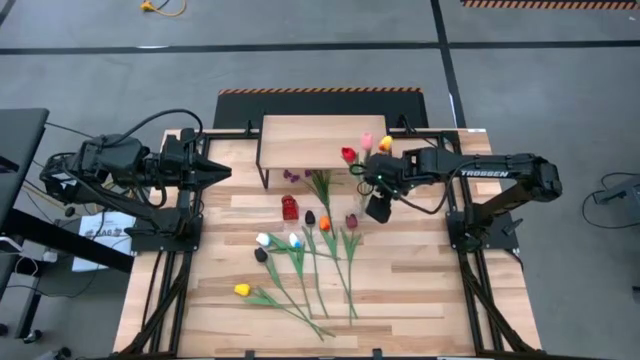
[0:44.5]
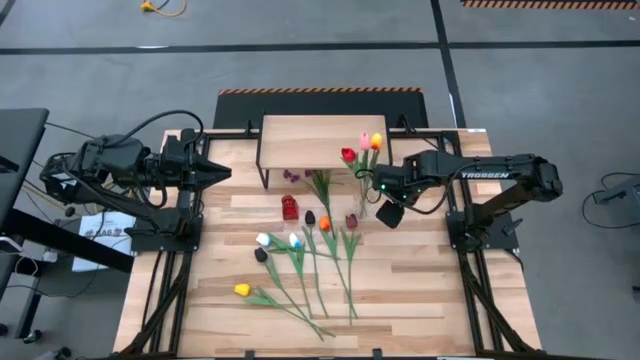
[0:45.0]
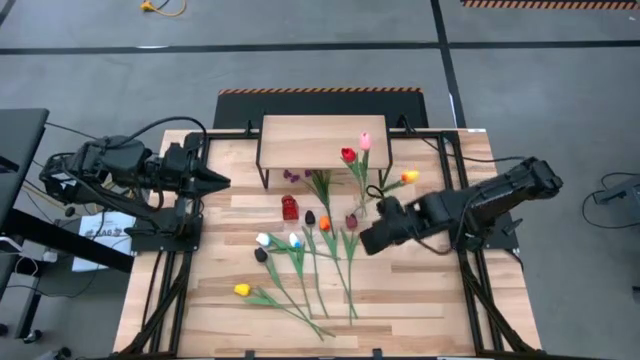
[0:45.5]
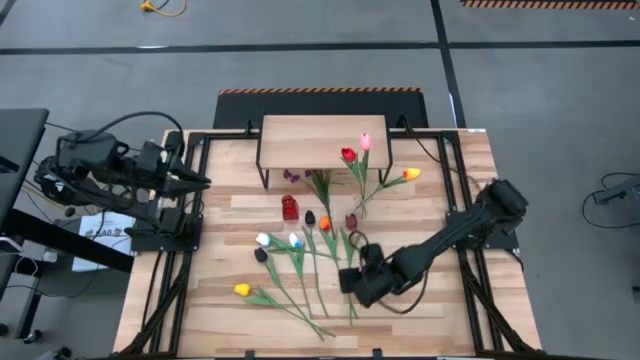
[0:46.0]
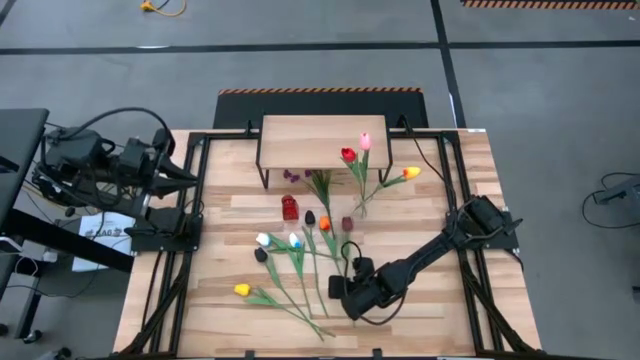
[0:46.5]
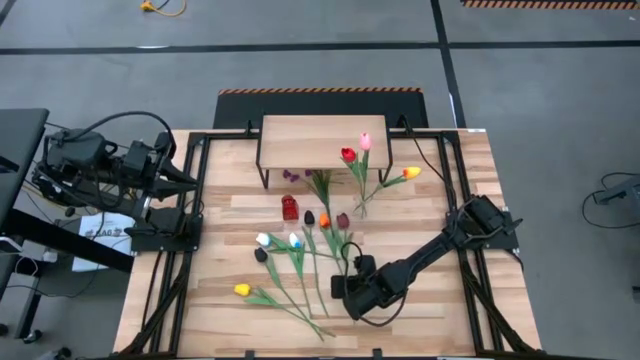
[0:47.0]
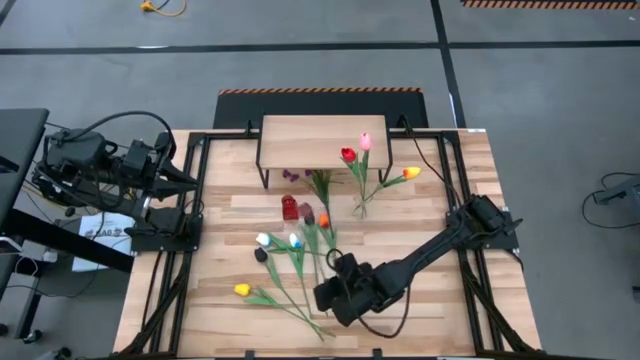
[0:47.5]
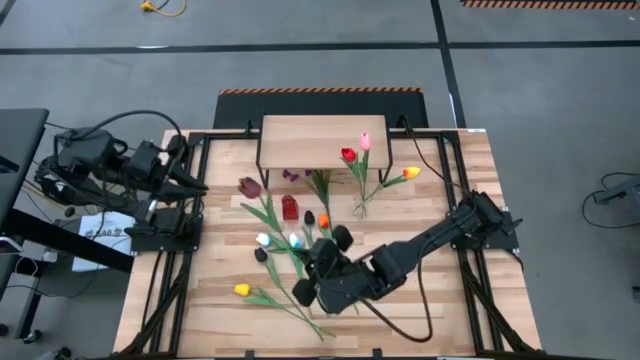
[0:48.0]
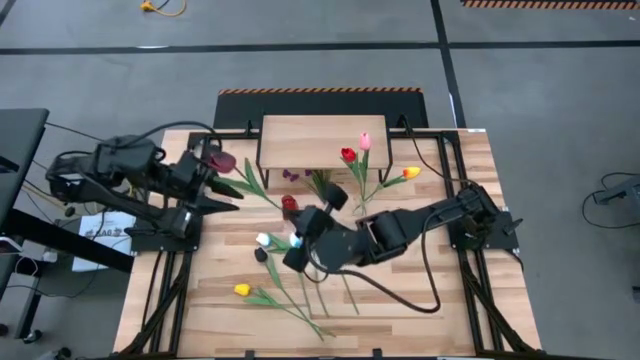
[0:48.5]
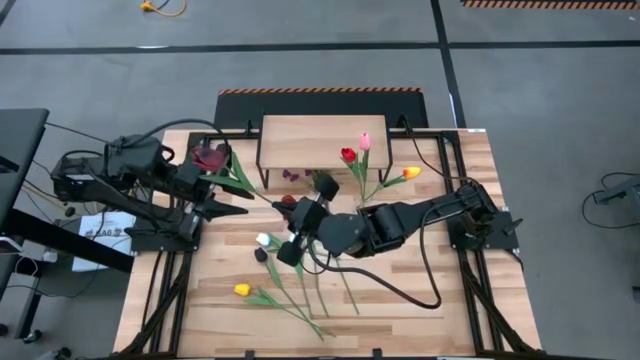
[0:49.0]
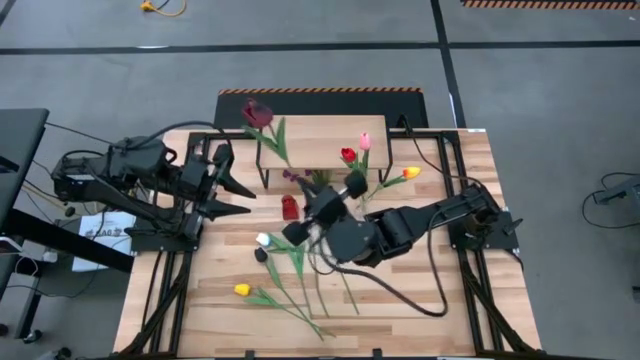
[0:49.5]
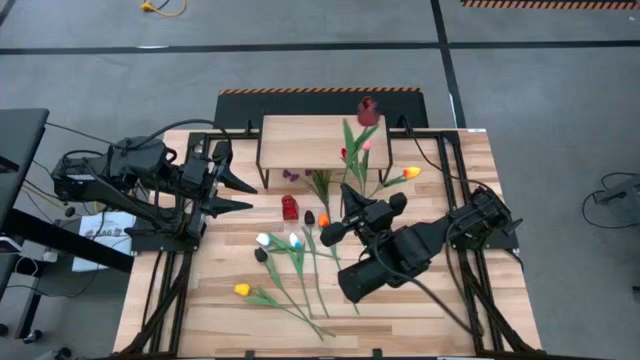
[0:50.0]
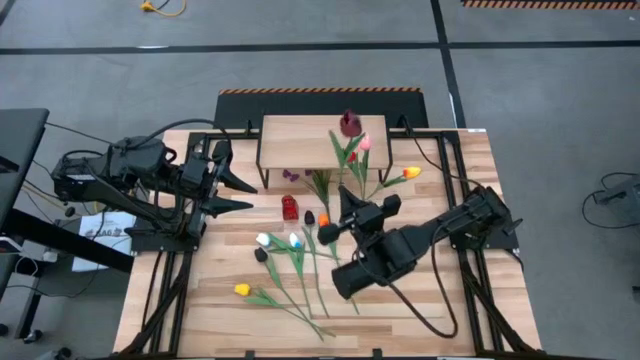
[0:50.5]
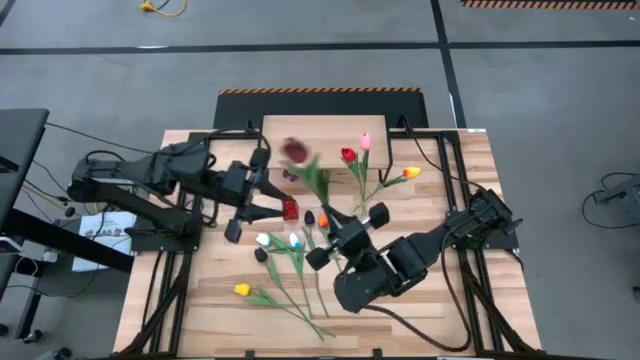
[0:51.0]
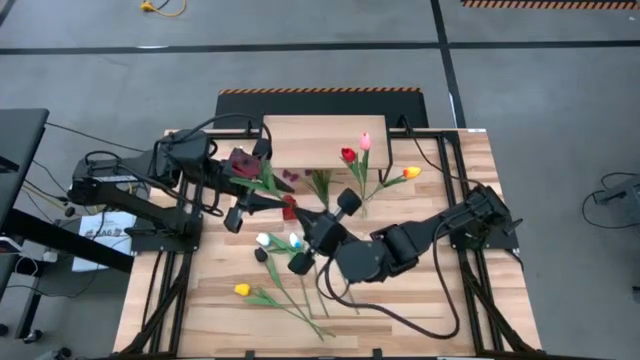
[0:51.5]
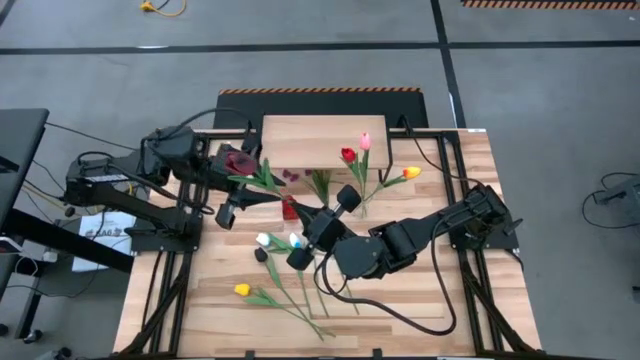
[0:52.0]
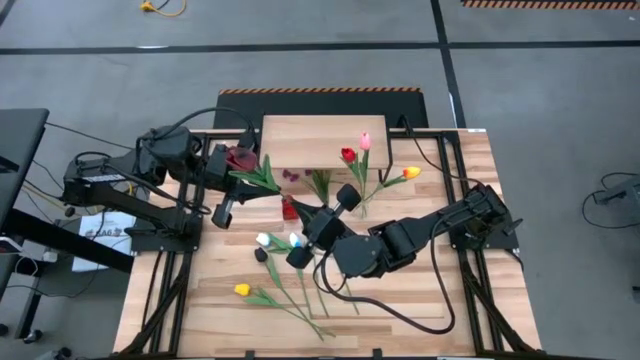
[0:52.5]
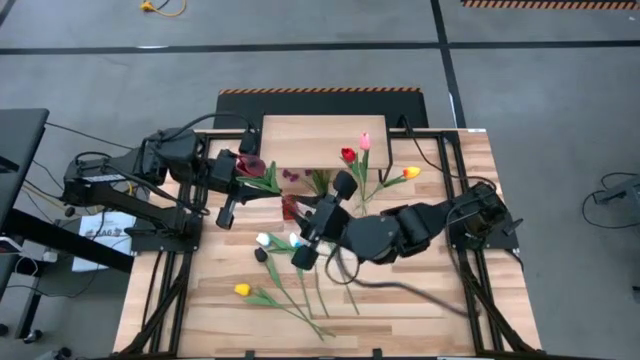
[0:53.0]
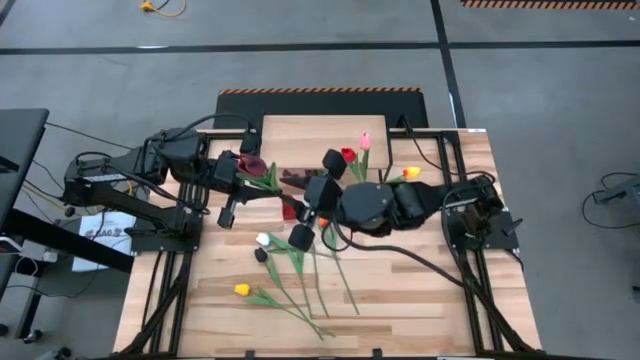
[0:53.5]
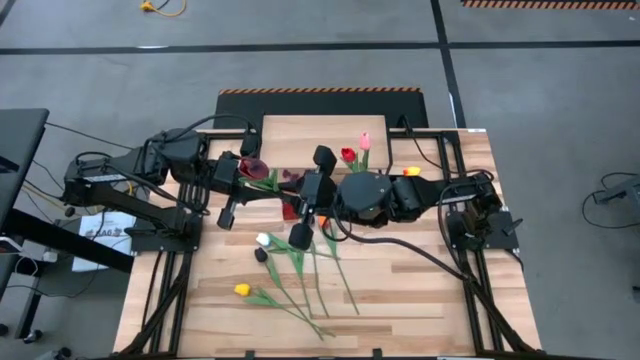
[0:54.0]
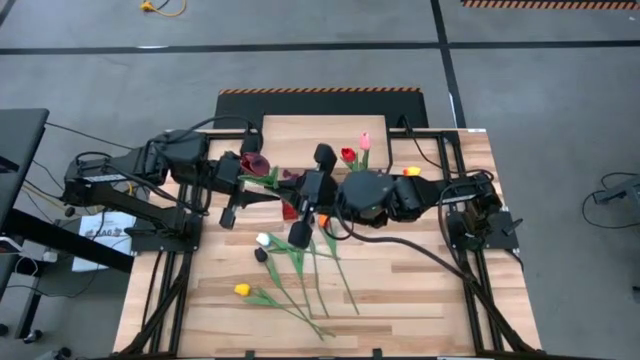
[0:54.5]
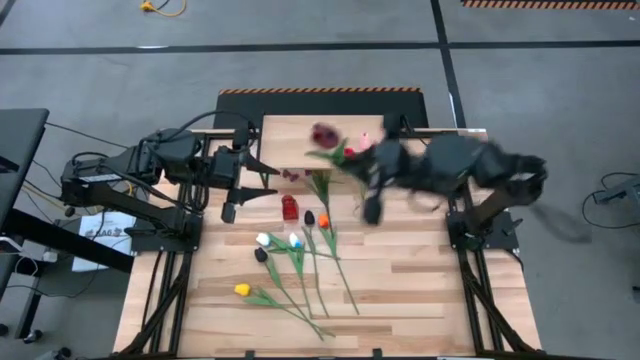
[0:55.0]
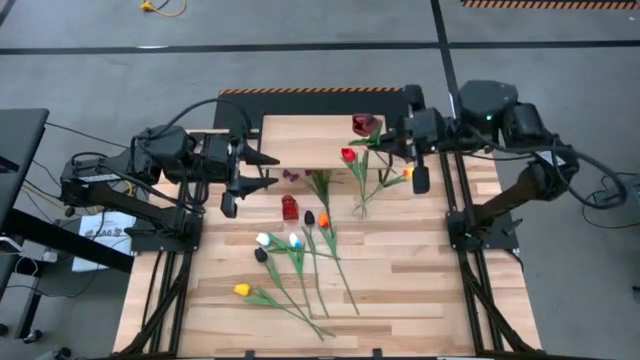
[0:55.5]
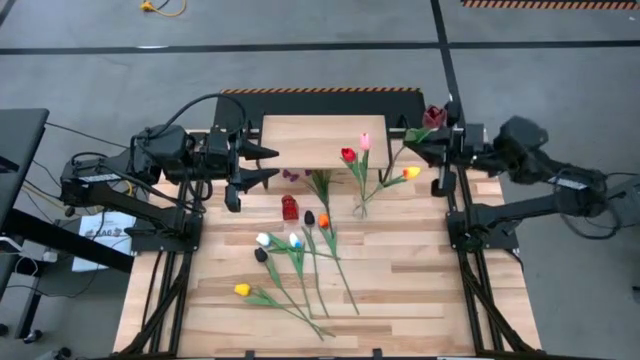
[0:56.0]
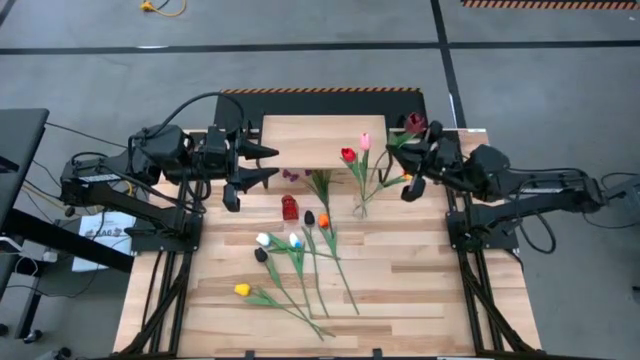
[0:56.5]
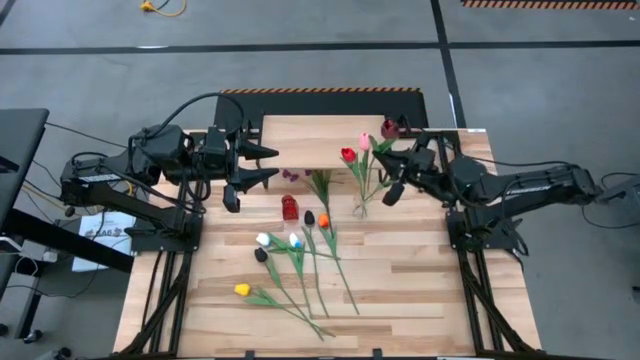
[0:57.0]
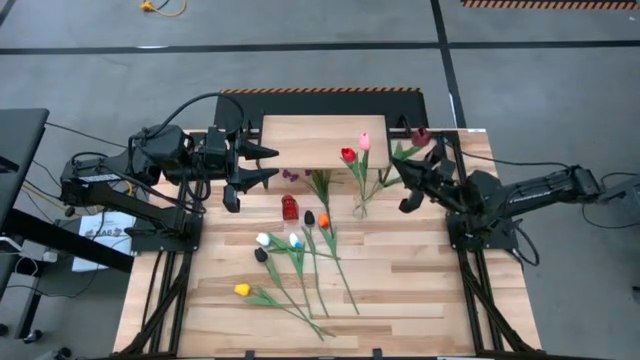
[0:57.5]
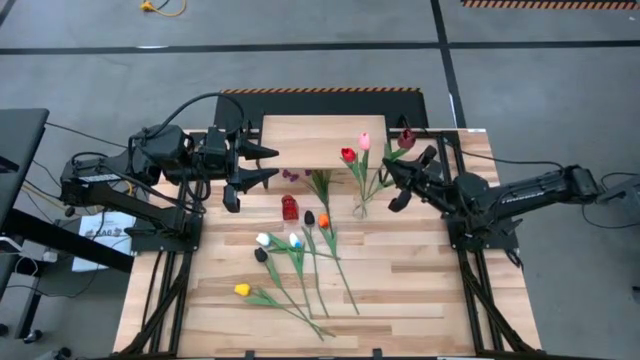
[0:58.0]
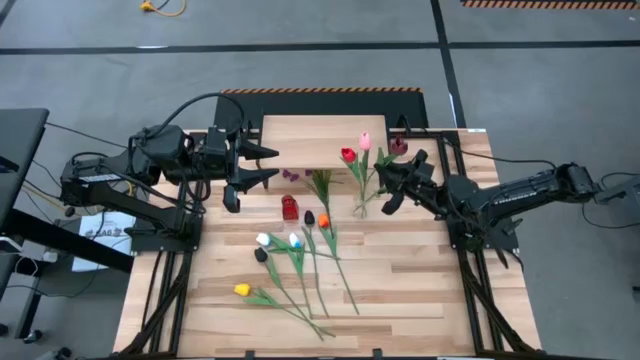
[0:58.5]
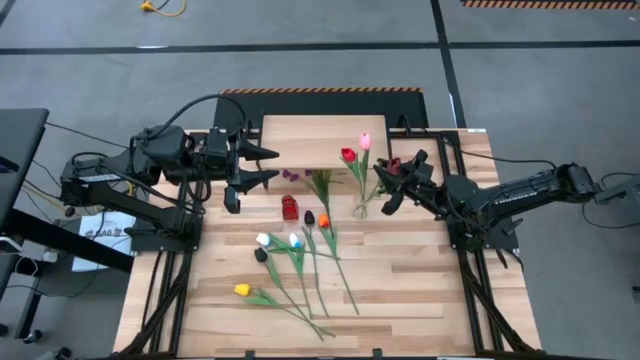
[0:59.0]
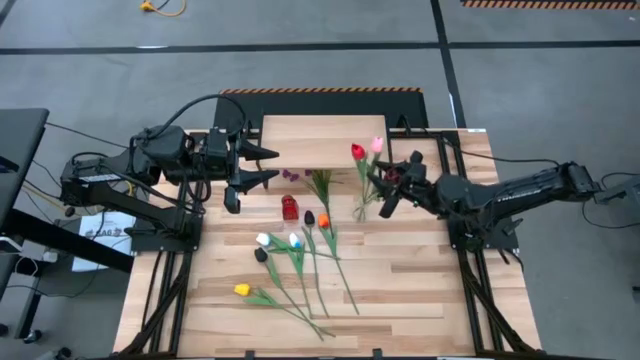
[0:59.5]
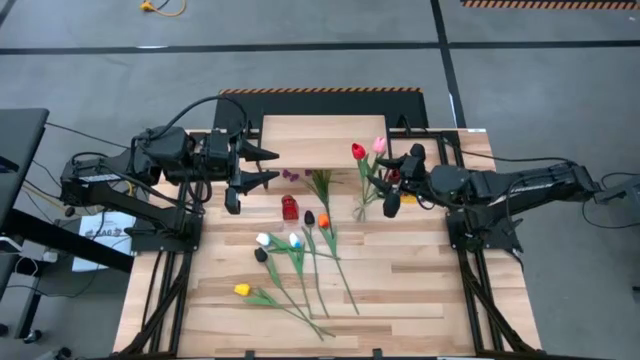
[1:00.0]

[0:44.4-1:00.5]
Task: Pick and place flowers into a vace then onto a shelf
Put the dark red tulip into the transparent vase

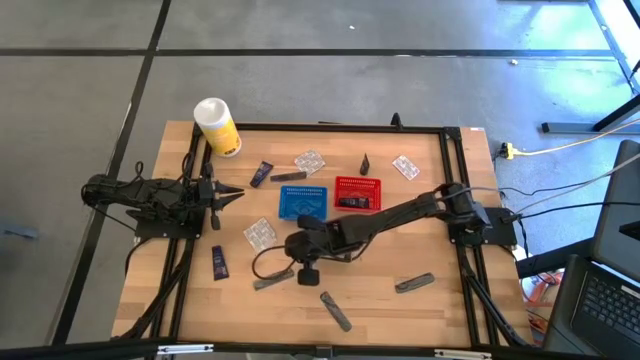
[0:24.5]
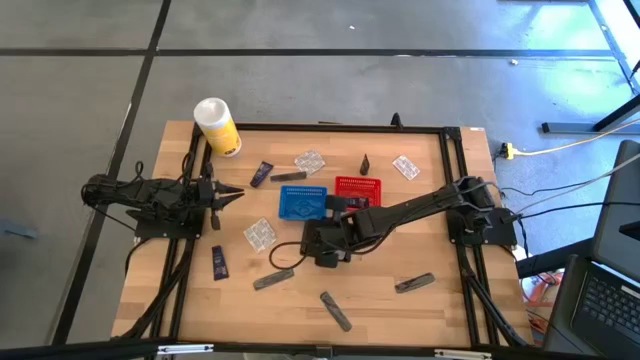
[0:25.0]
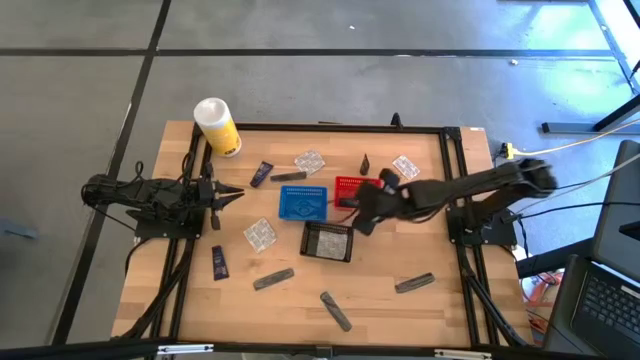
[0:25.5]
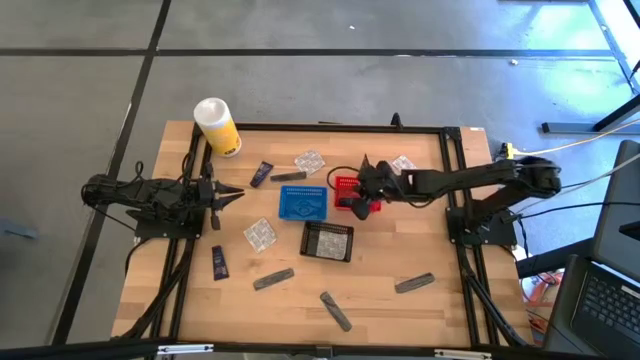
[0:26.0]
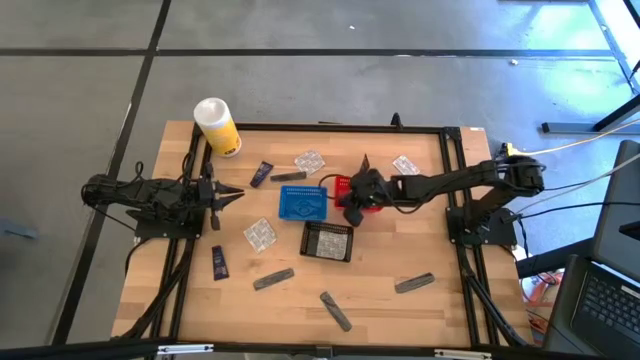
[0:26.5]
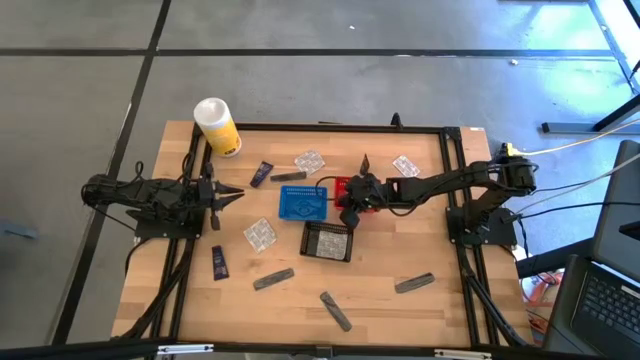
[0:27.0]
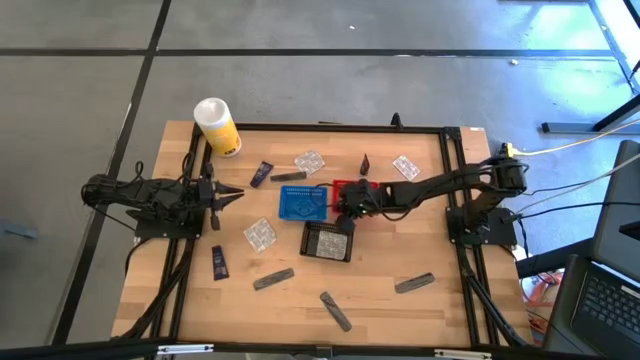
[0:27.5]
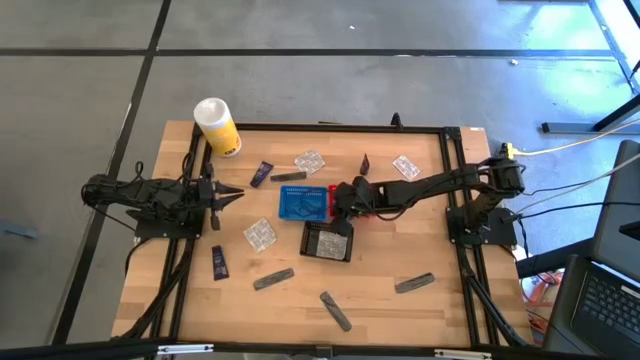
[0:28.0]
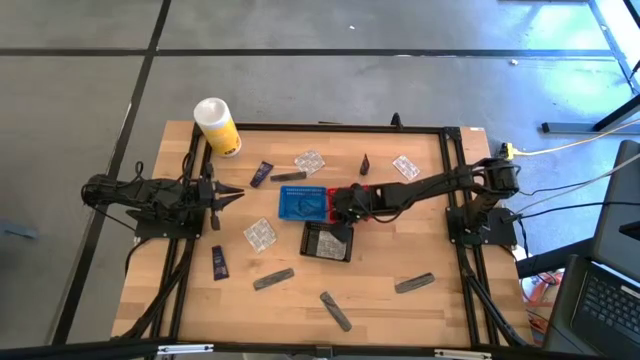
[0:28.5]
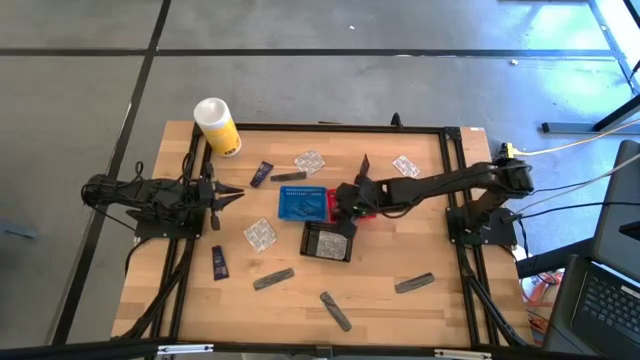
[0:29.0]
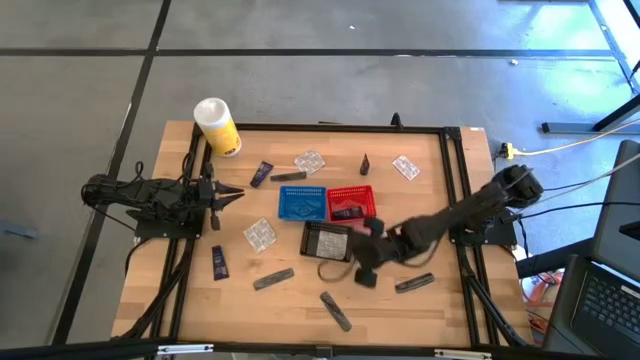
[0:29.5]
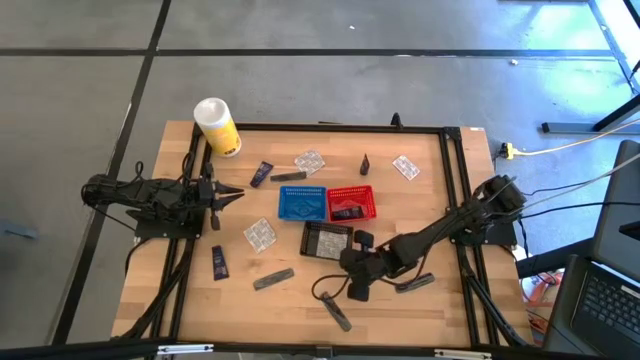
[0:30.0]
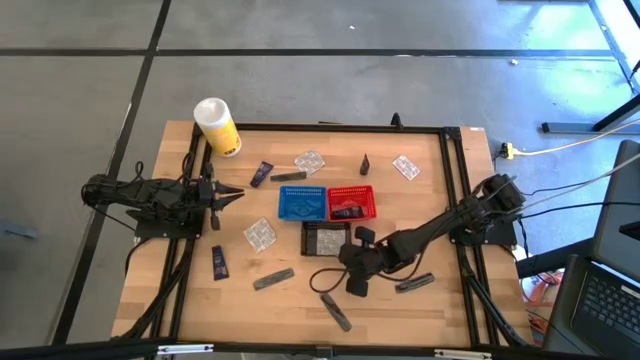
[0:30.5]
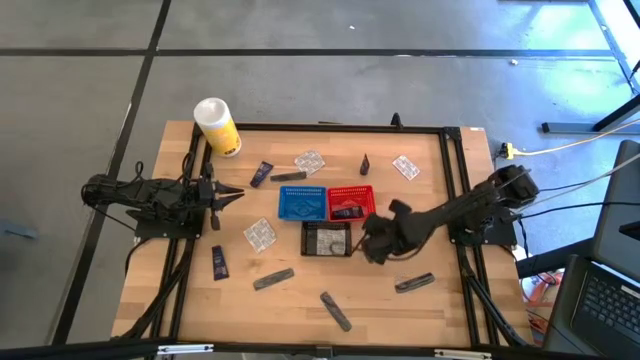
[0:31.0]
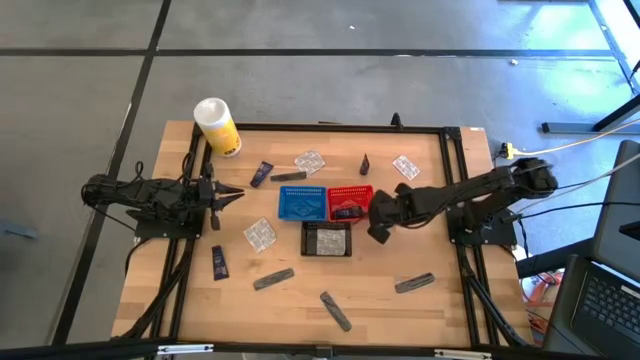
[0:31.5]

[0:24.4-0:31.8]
Task: Pick & Place Travel size toiletries
Adjust the red bin
